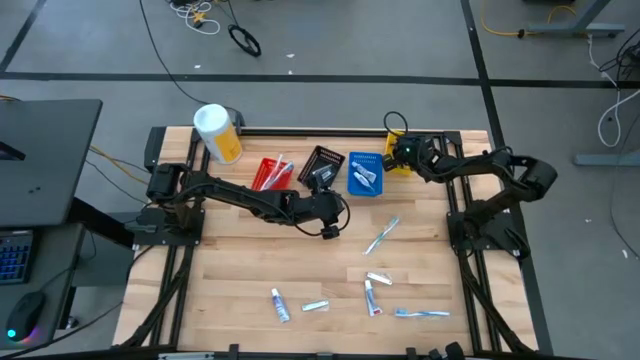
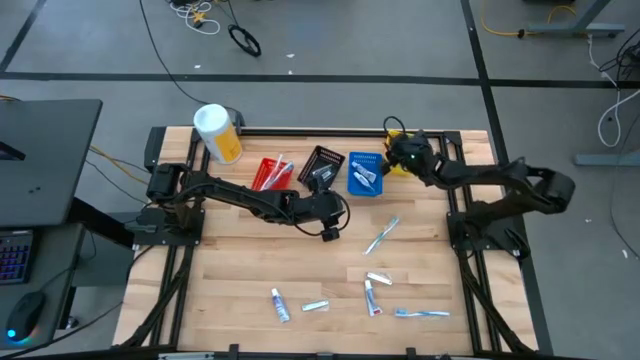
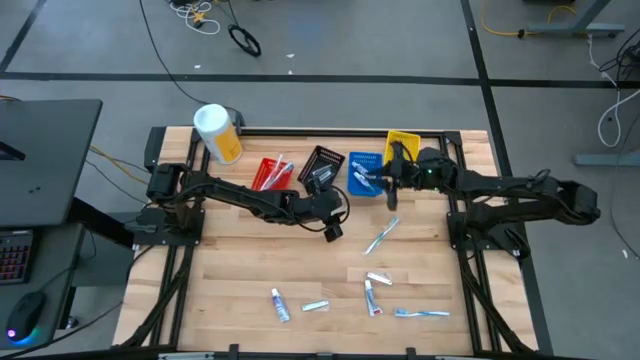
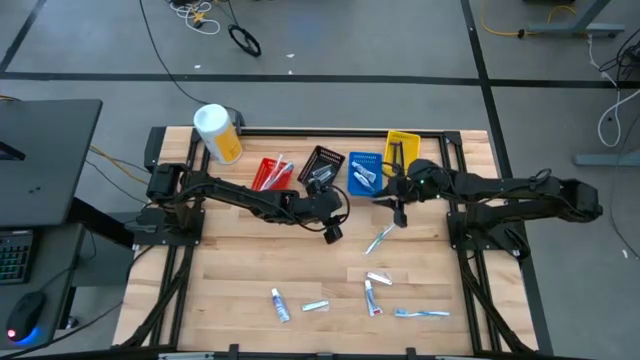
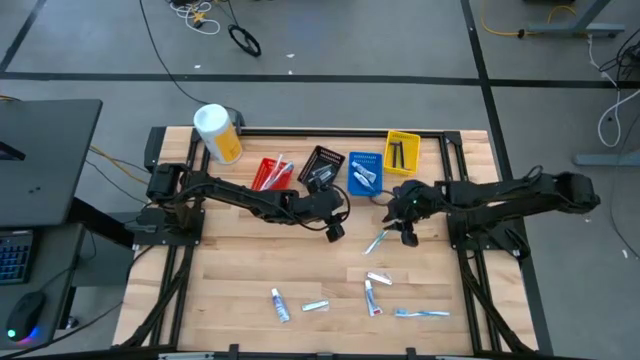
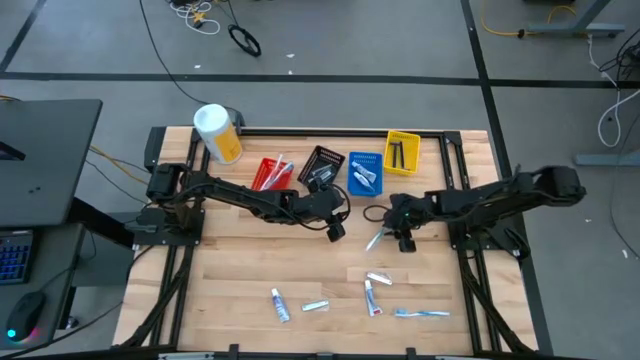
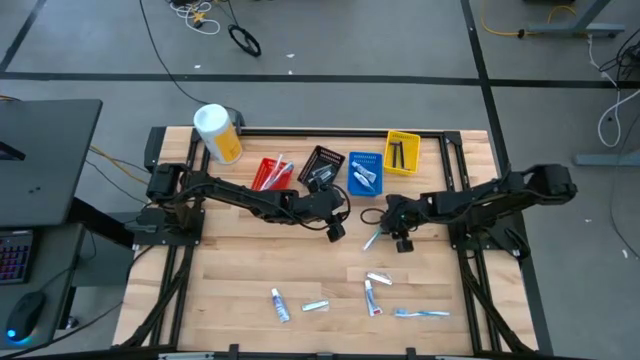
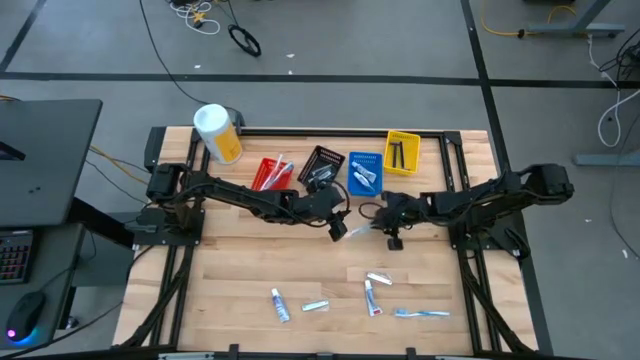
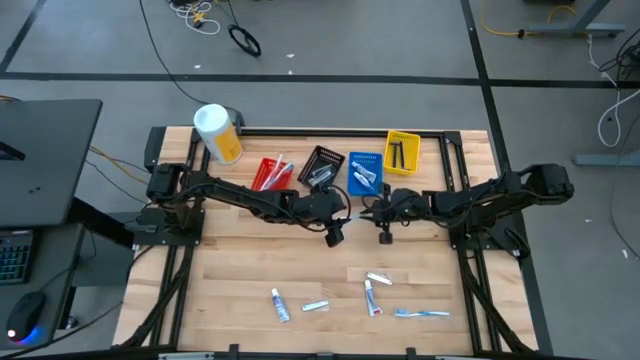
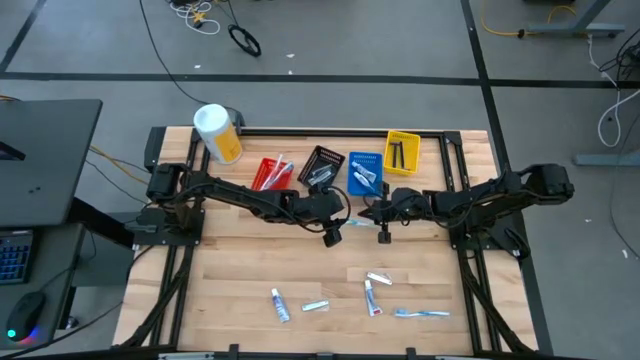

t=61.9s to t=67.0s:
Task: Pick & Place Travel size toiletries
Put the green toothbrush into the red bin

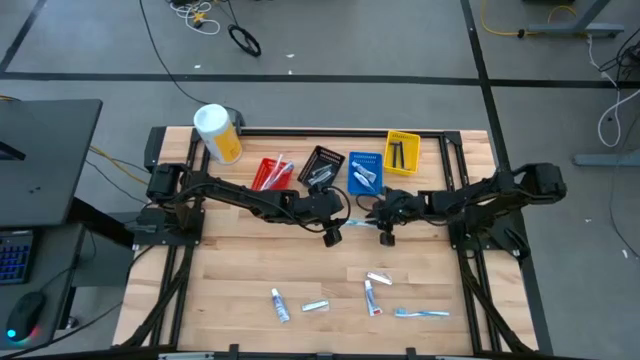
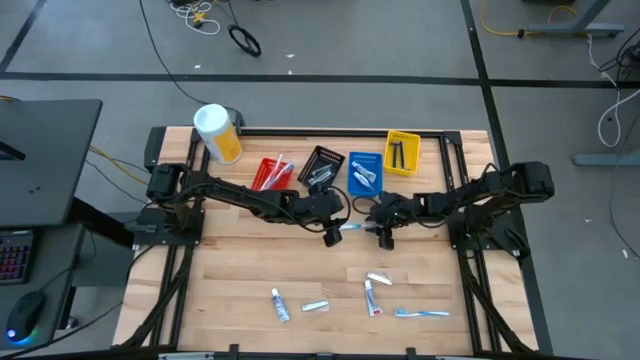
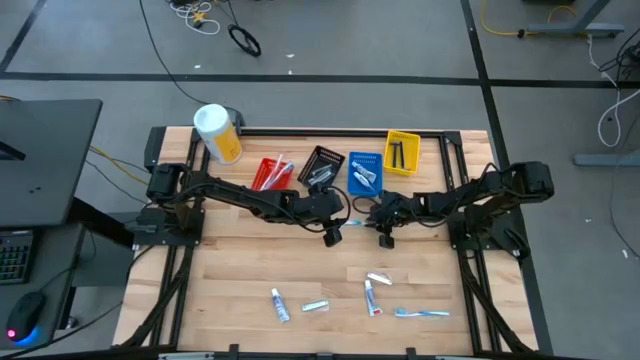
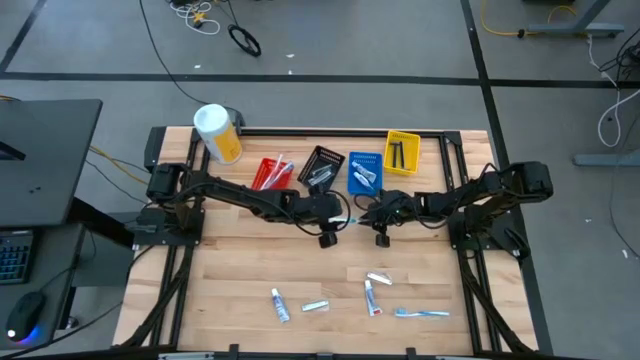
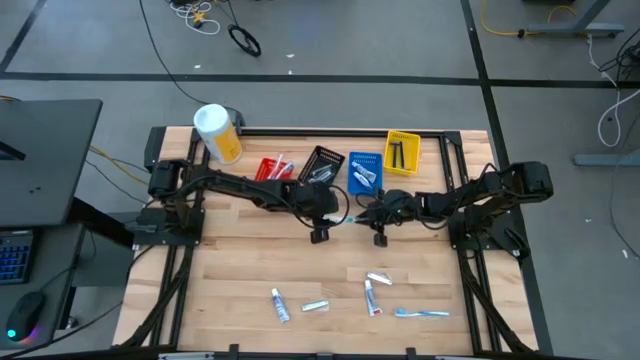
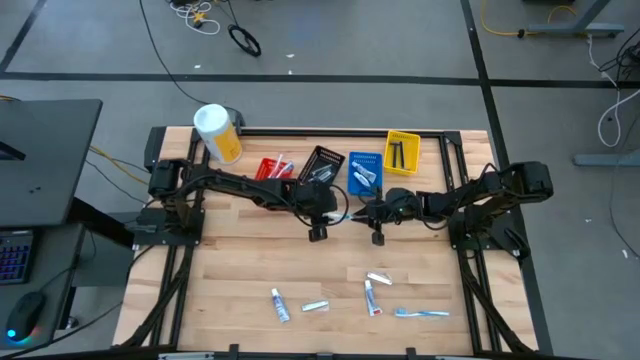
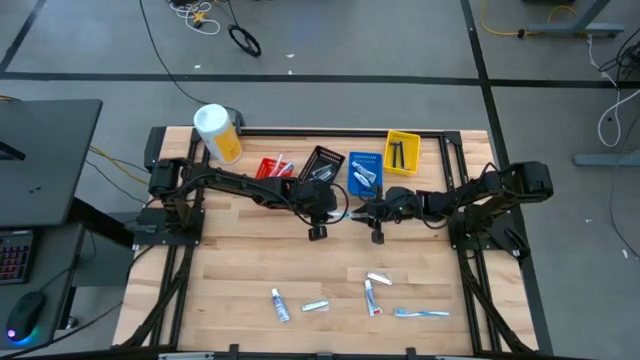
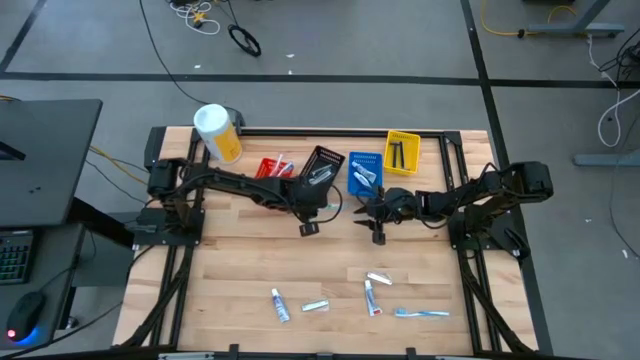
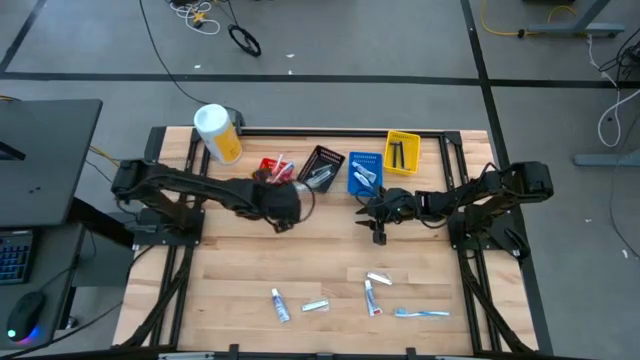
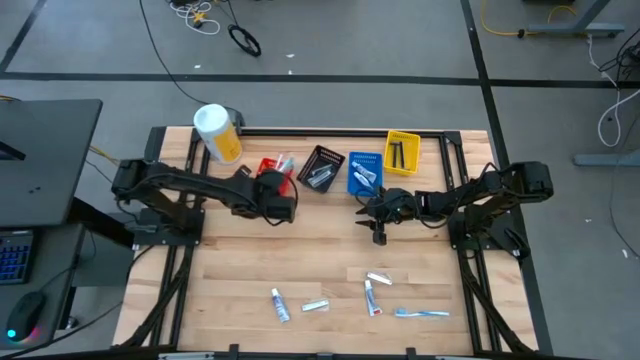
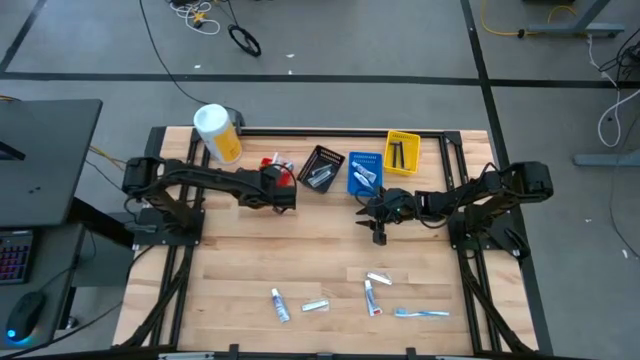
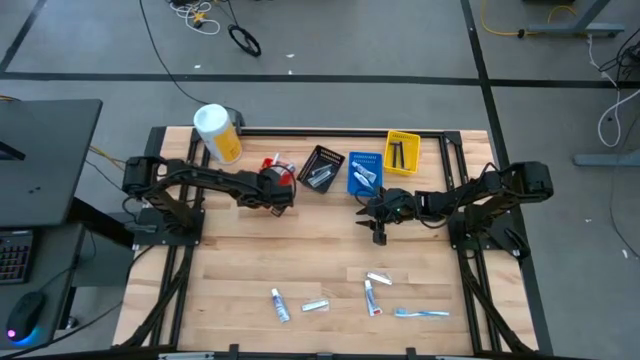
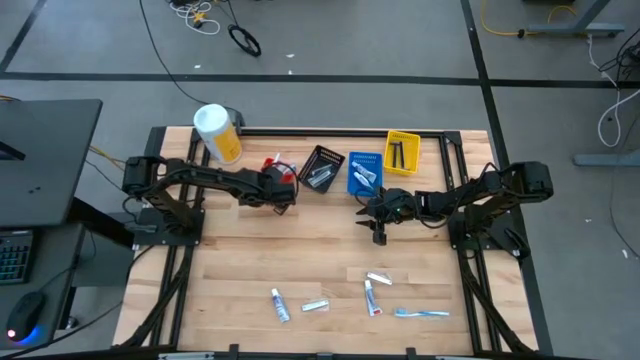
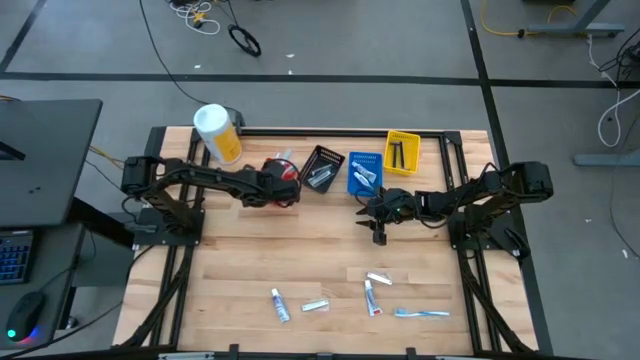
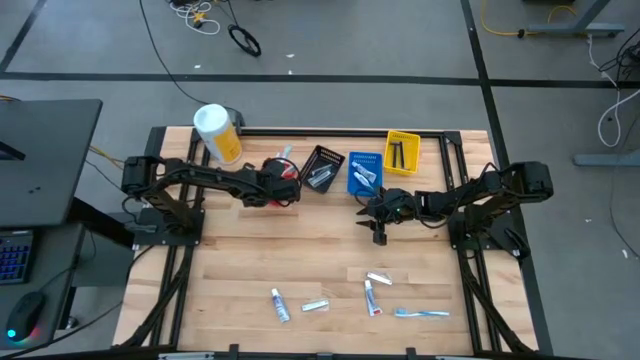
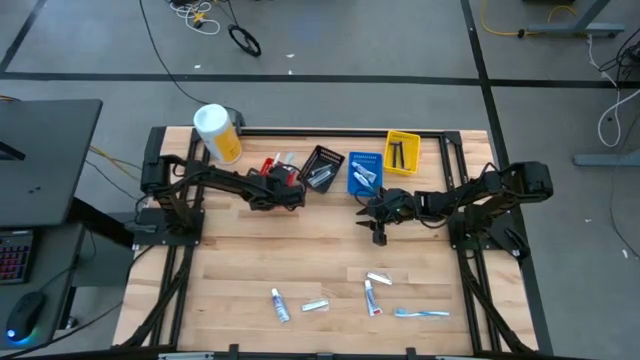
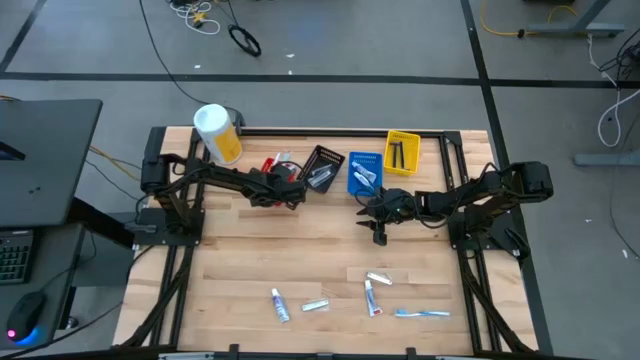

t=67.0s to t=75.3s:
Put the green toothbrush into the red bin

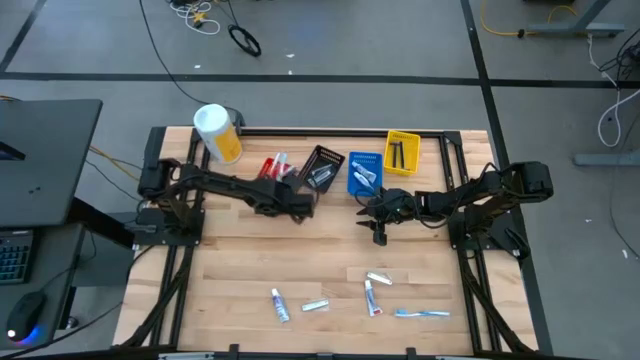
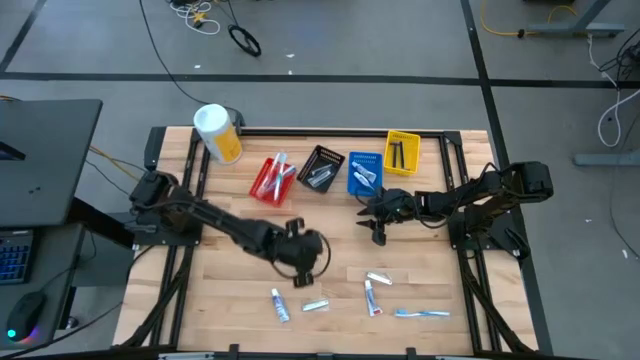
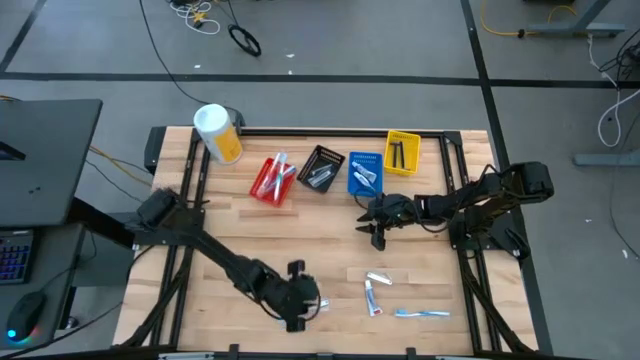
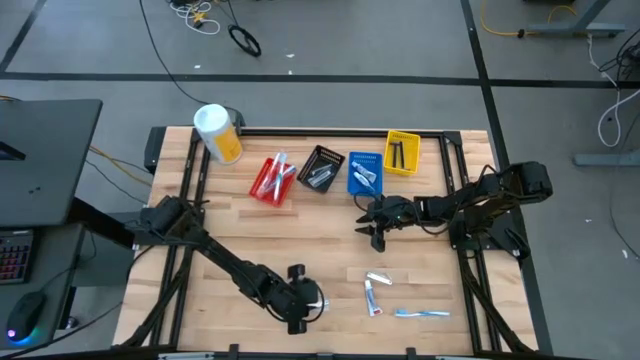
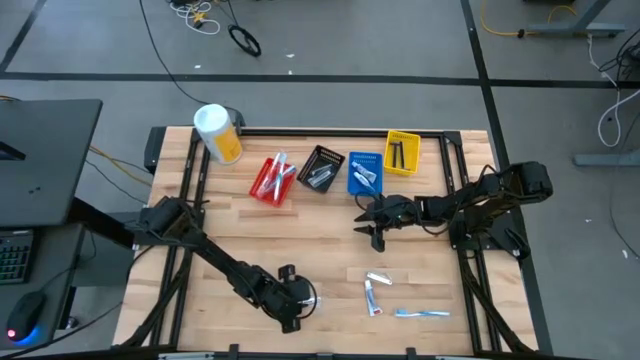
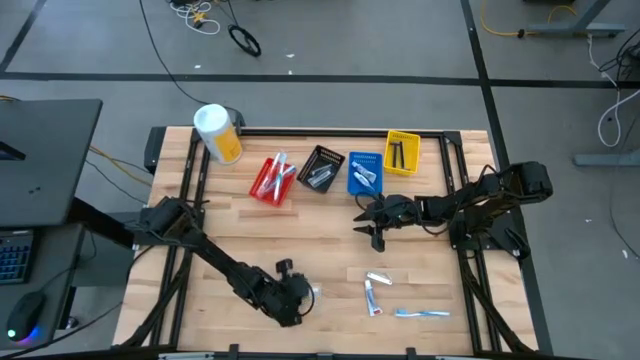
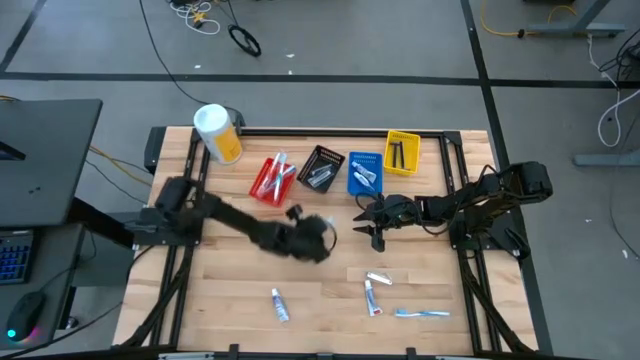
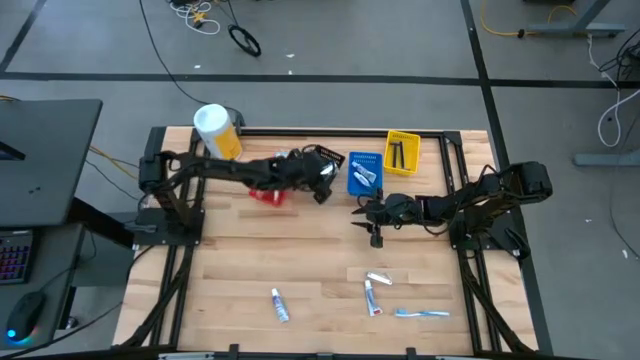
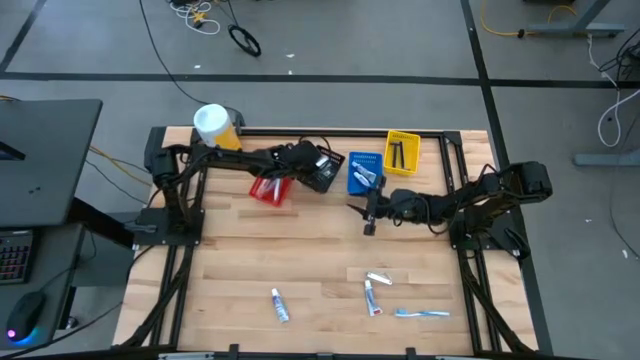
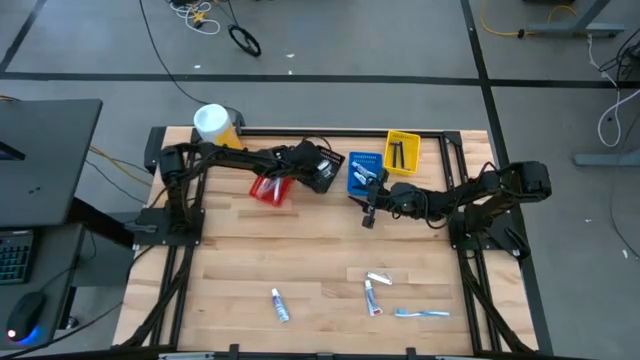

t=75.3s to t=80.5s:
Put the nail cutter into the black bin

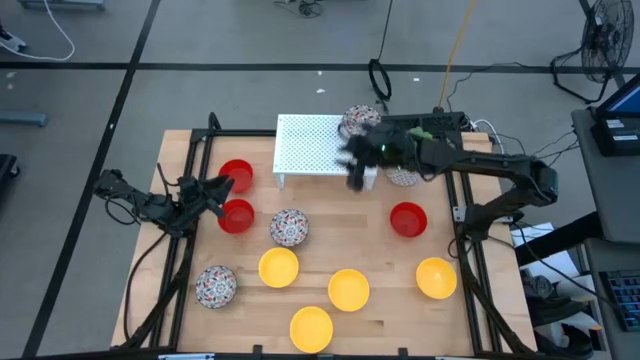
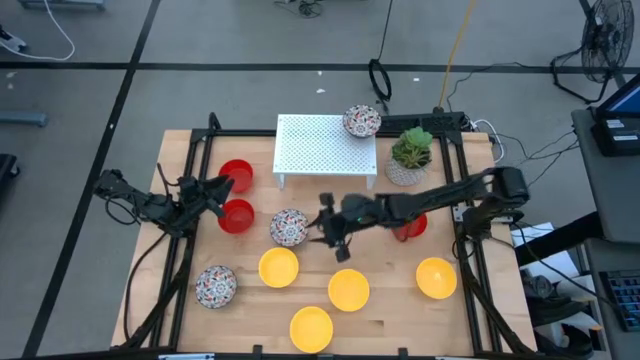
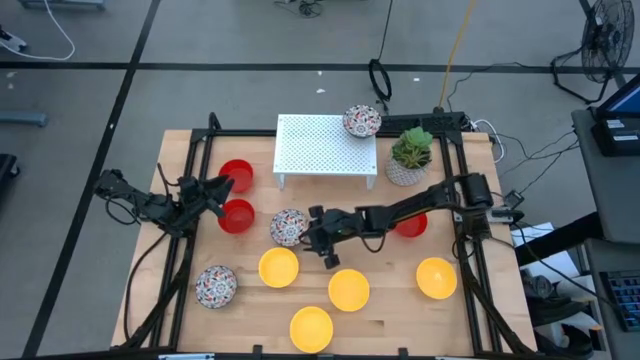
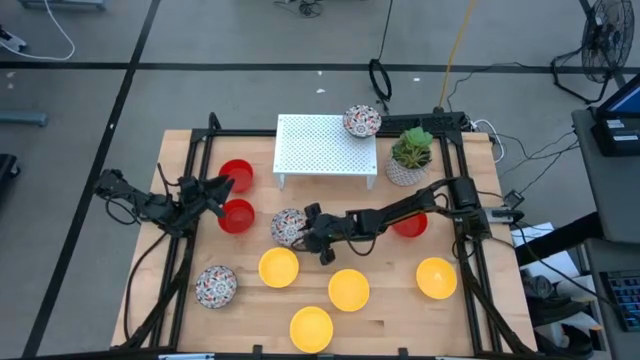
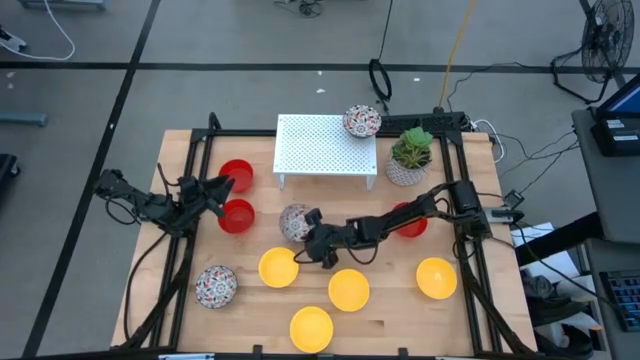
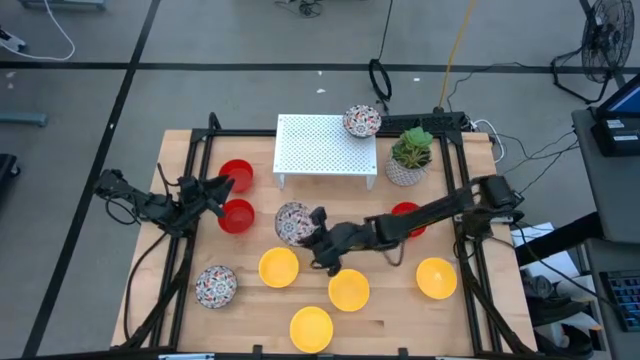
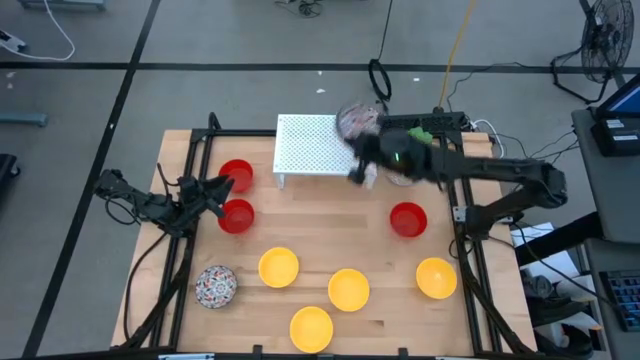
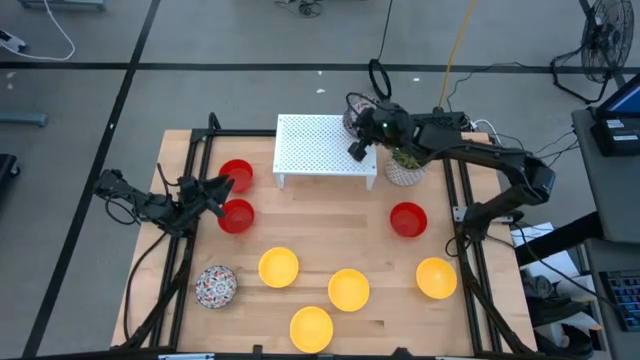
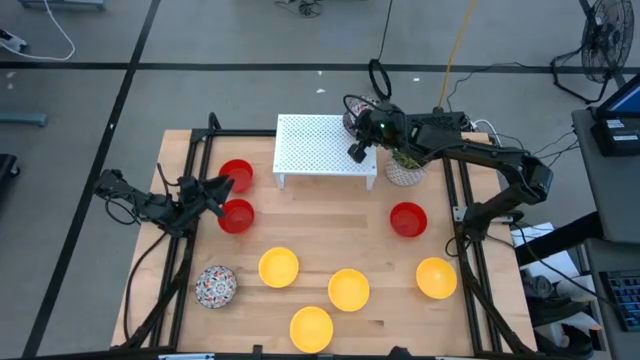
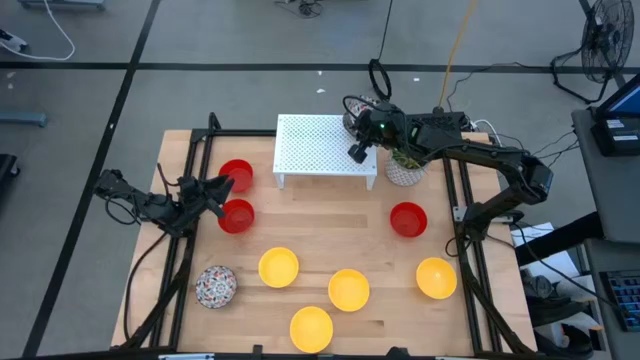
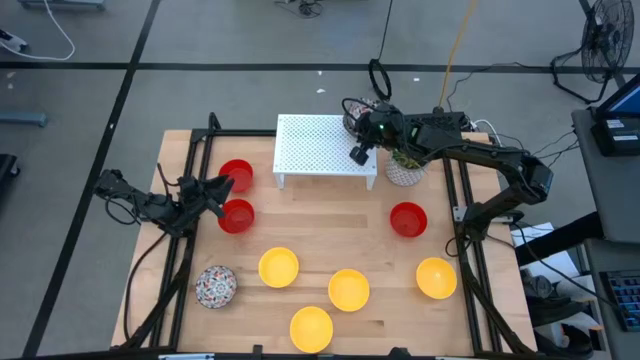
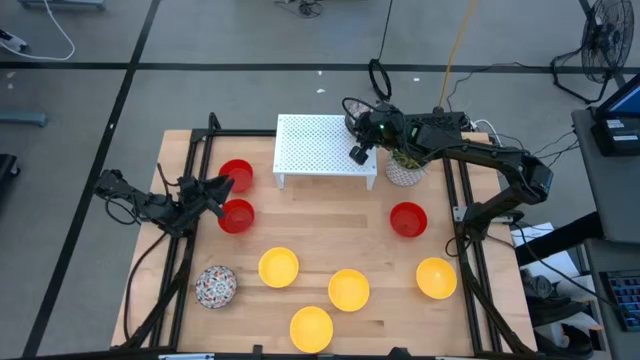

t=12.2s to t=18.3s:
Task: Pick & Place Mini bowls
Stack the white patterned bowl on the other white patterned bowl on the shelf
